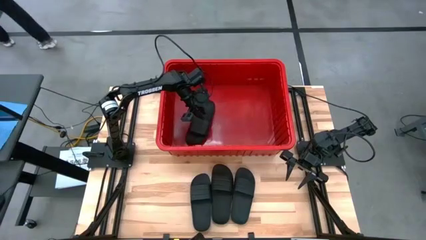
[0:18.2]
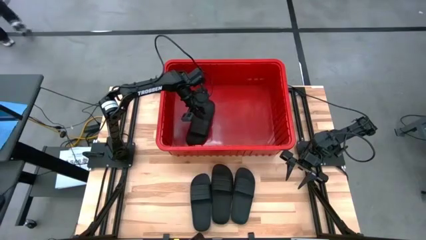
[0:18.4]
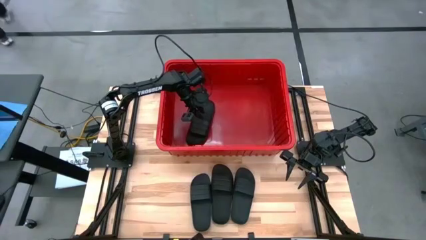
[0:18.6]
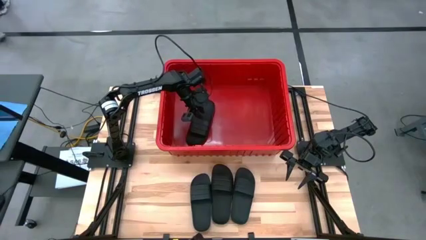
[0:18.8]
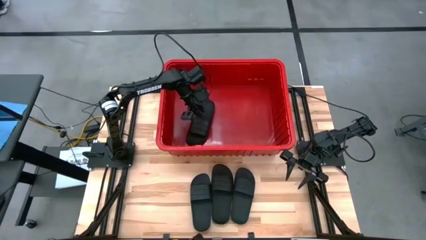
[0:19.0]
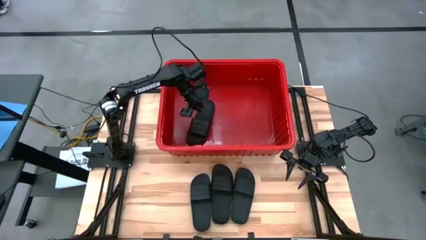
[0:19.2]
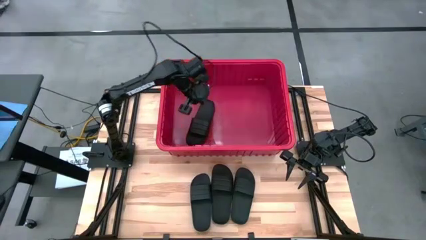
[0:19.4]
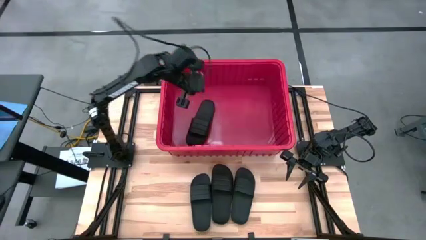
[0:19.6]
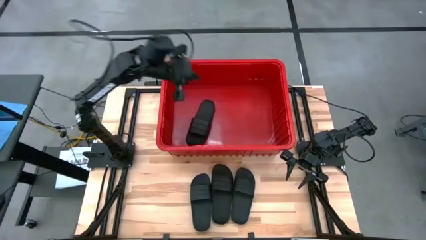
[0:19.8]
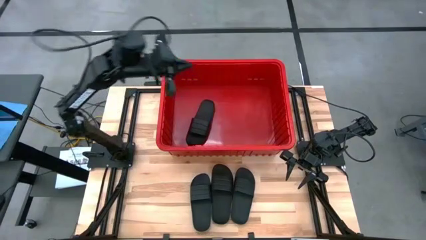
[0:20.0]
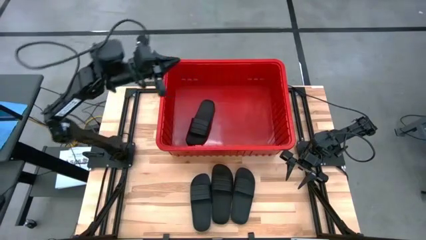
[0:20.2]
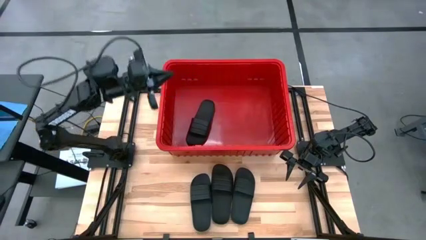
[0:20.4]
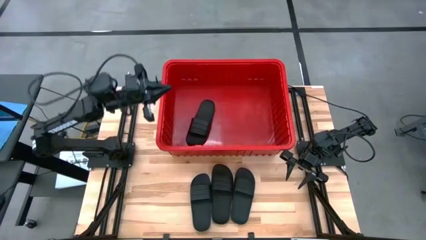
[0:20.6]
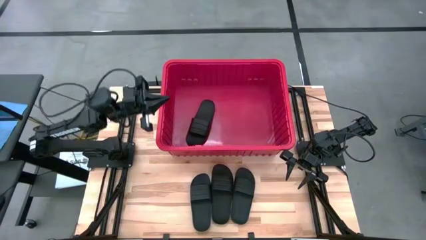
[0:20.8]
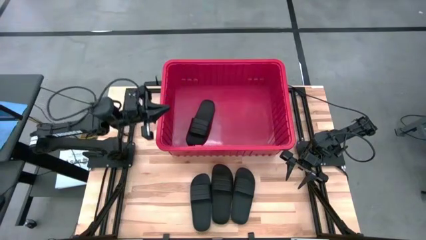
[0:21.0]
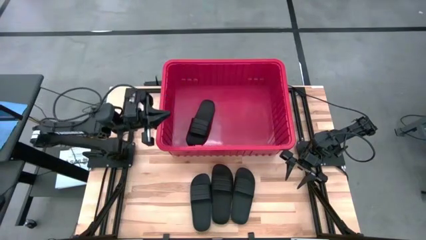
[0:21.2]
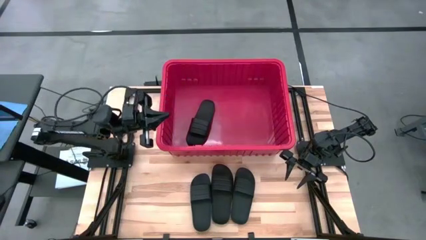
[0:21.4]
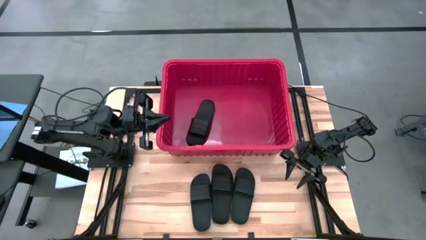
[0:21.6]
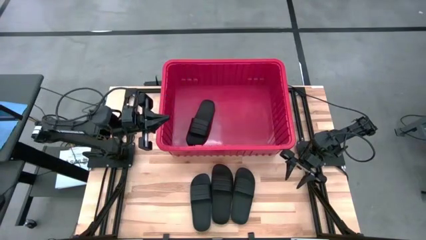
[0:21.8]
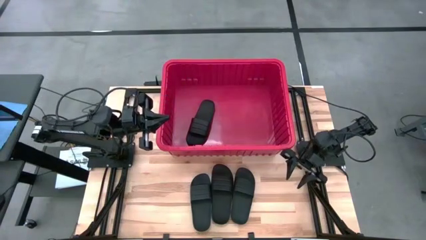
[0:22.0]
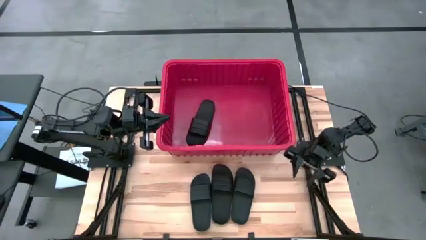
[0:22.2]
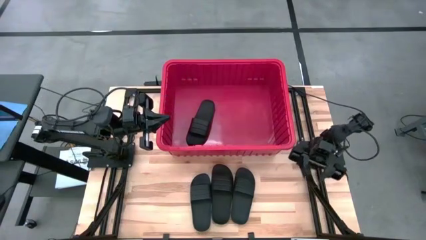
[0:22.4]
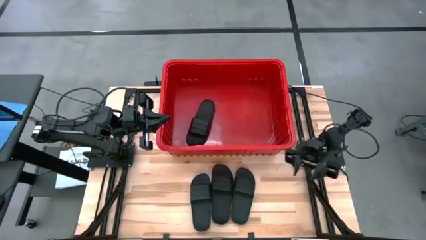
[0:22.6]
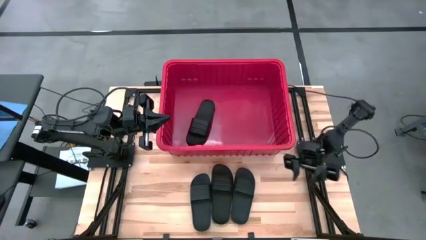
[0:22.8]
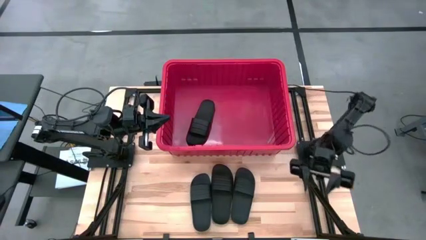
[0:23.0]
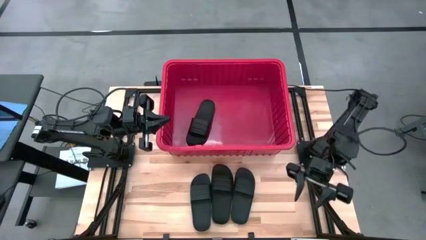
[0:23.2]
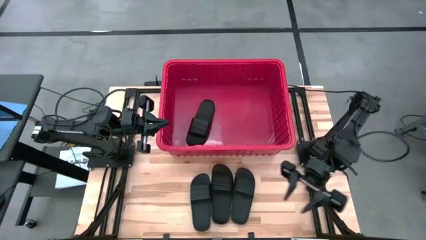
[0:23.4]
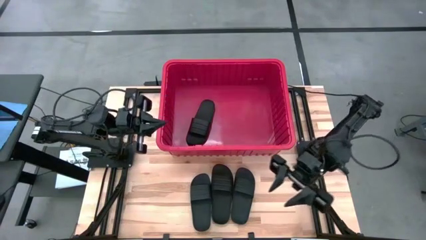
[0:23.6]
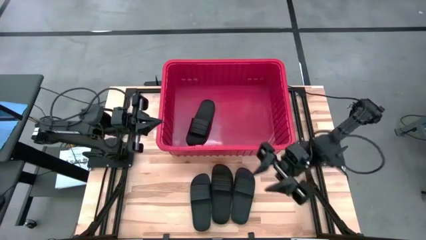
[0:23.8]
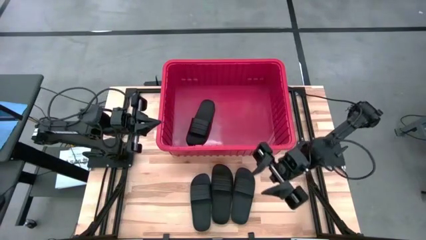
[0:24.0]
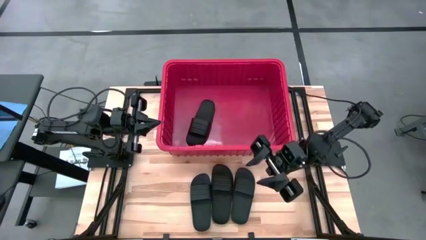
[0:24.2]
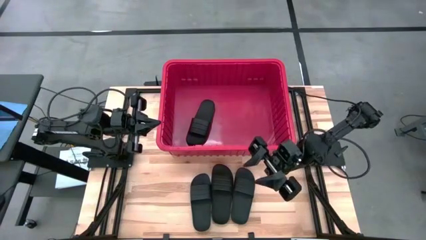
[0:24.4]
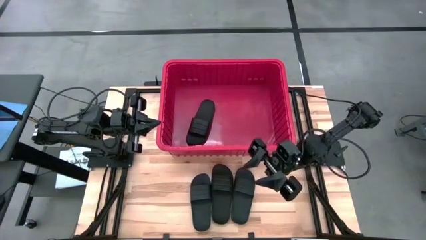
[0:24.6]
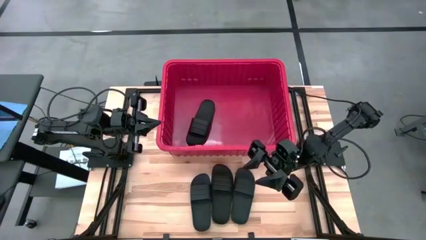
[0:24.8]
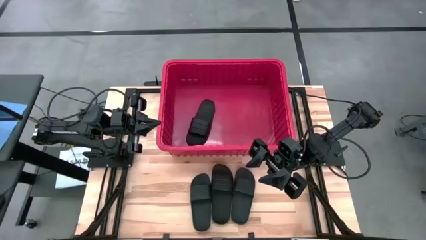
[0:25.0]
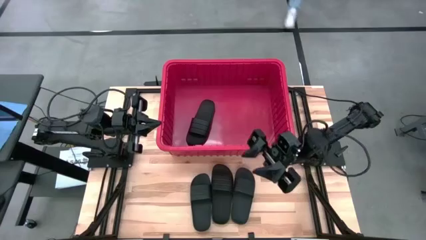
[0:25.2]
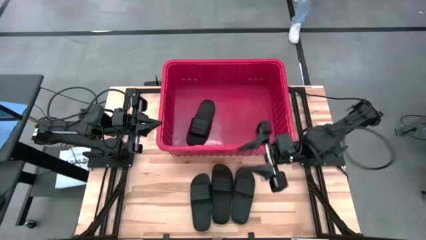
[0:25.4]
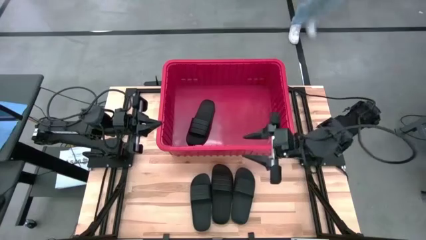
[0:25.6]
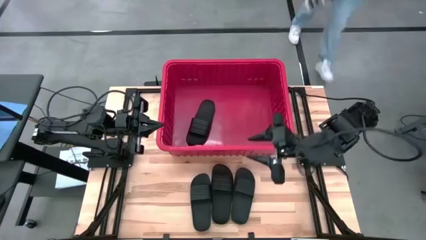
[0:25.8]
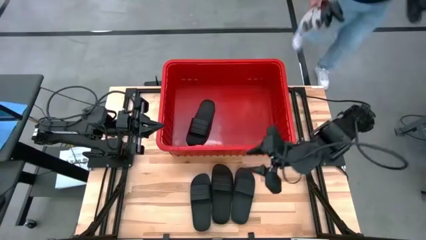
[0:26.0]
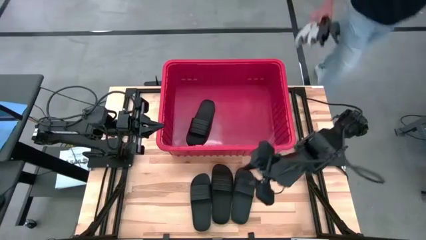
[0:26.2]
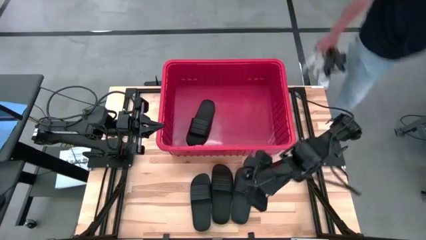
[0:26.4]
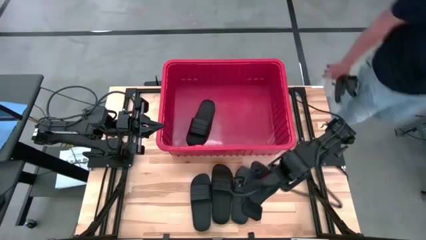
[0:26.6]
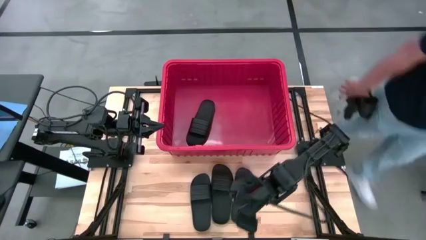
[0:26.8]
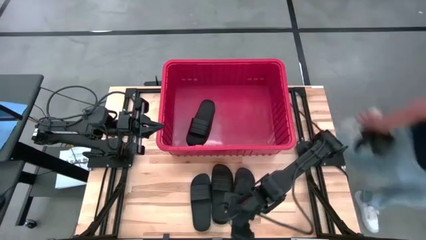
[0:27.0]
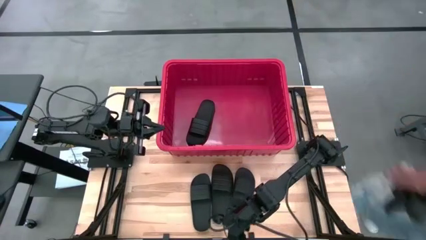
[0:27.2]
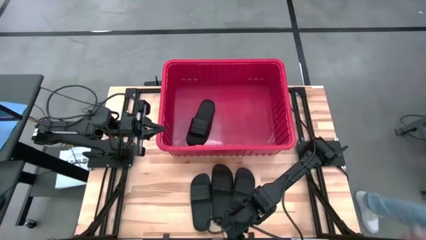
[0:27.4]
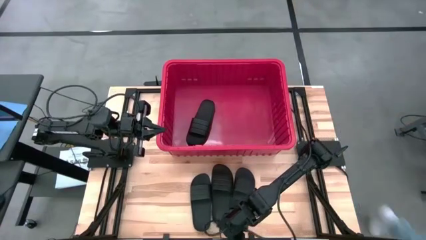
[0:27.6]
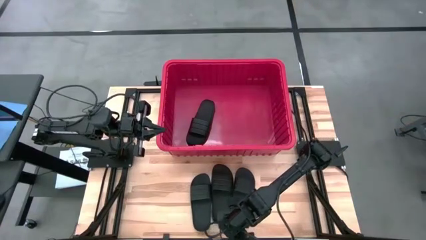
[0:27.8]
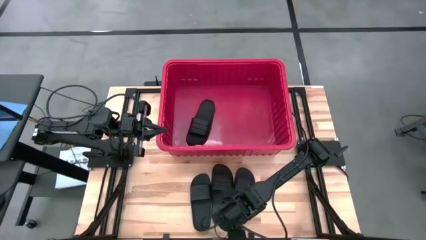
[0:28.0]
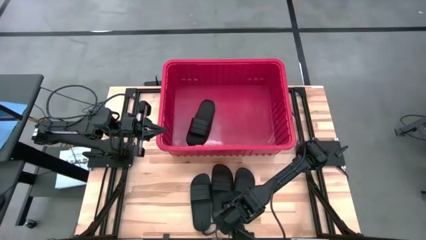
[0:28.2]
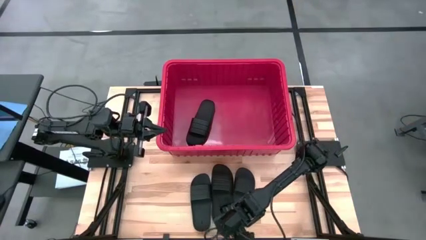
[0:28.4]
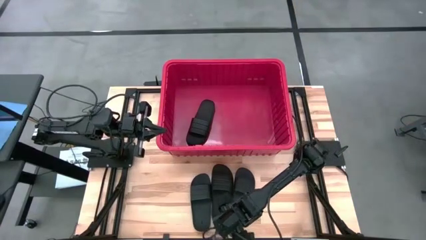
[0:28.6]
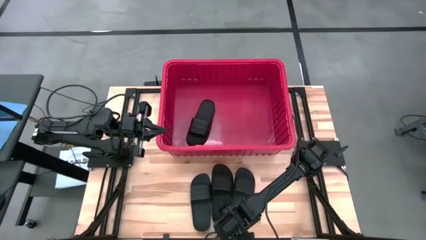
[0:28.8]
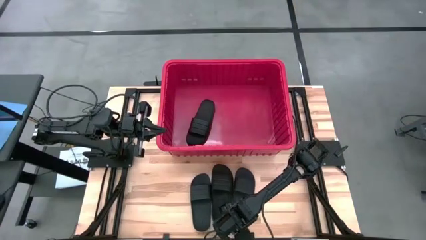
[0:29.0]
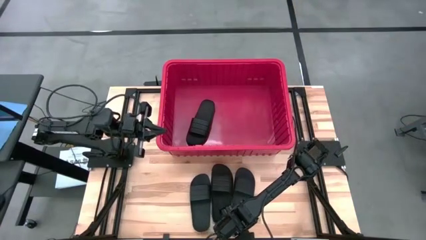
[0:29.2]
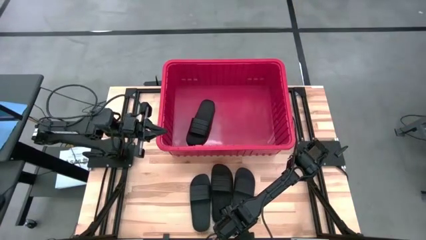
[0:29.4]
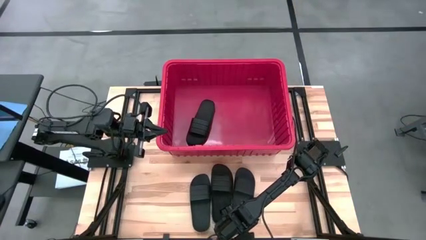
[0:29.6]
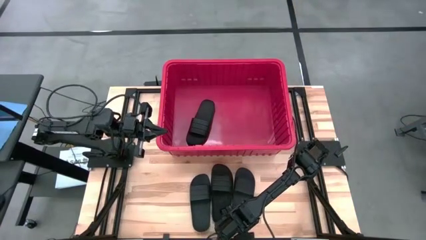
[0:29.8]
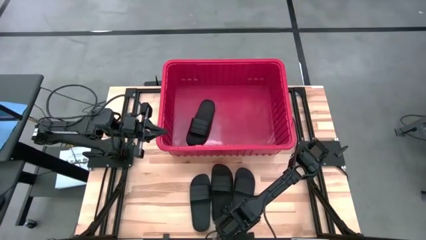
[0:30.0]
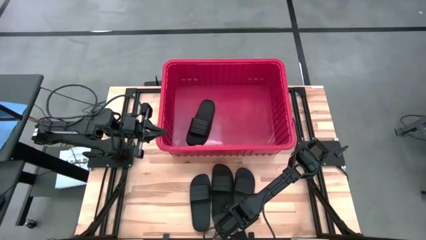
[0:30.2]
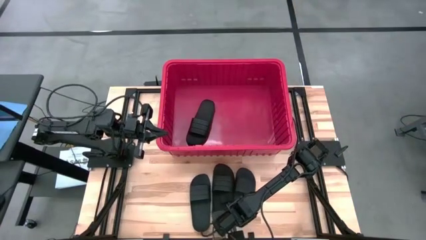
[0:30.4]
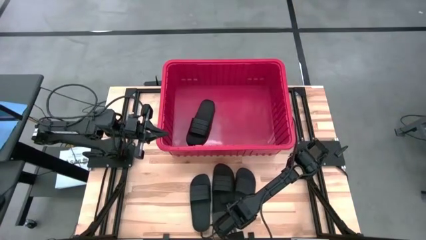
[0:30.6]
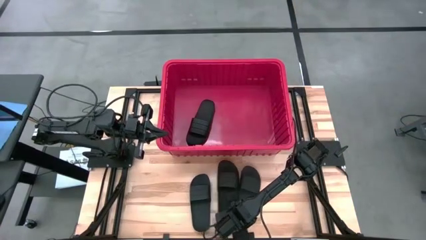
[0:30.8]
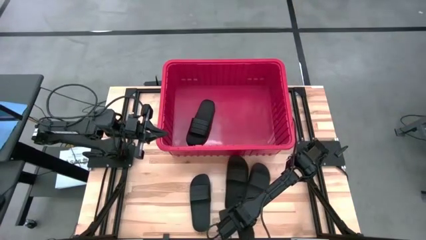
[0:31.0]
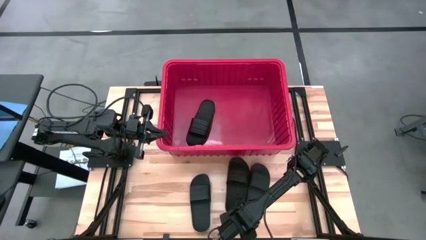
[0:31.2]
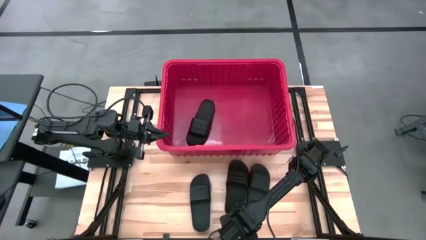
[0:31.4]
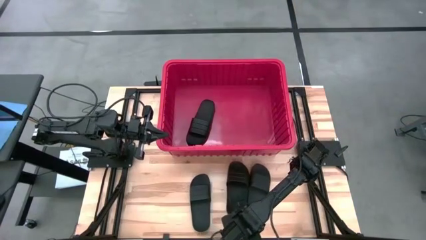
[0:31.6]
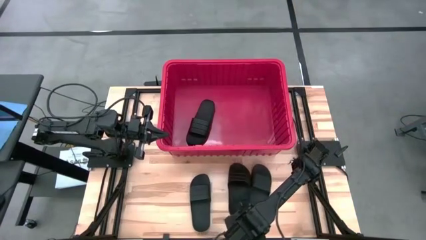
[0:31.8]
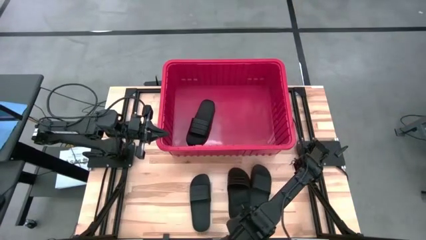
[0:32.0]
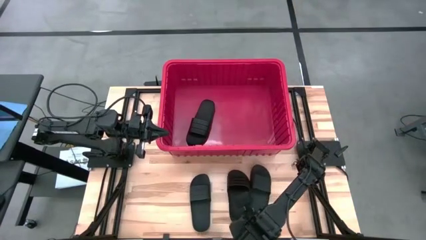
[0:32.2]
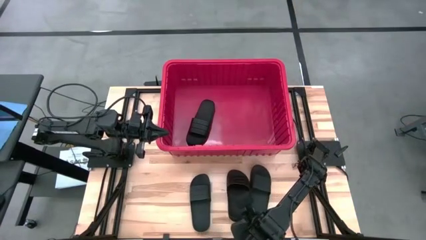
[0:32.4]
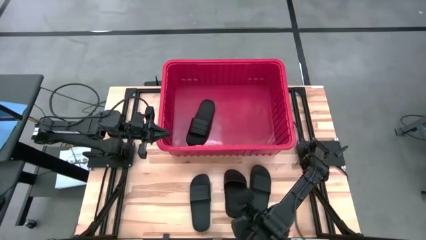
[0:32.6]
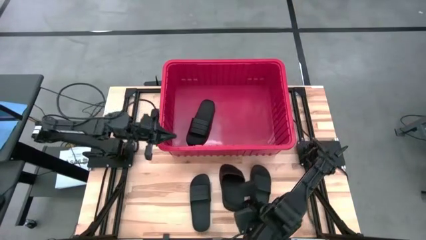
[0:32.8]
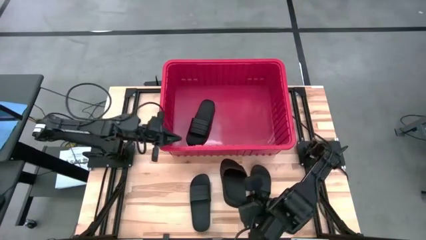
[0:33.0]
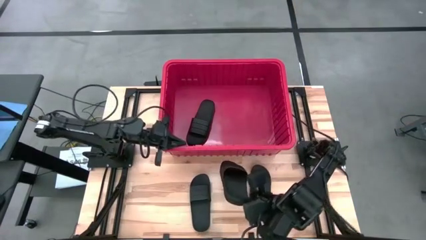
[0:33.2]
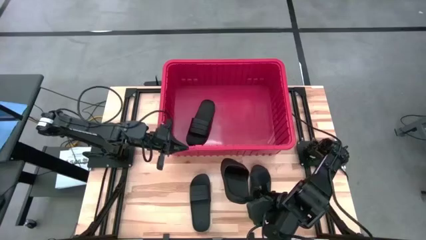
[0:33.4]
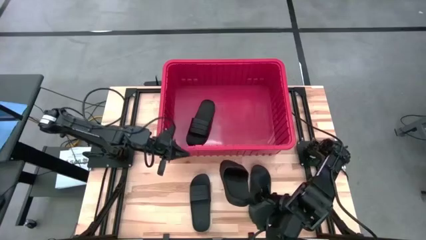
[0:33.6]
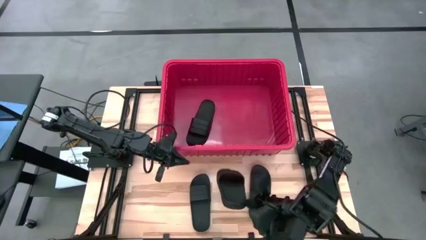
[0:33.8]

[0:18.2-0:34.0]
Task: Pick and place slides into bin
Put the black slide into the red bin
